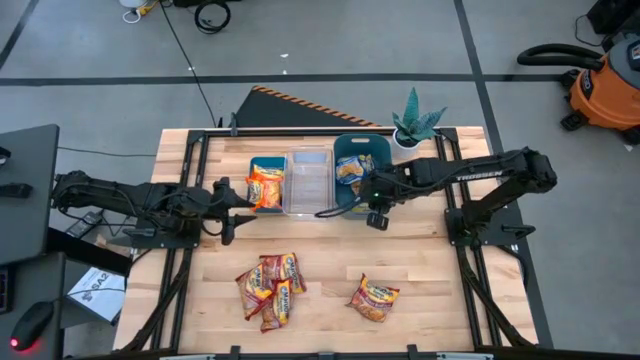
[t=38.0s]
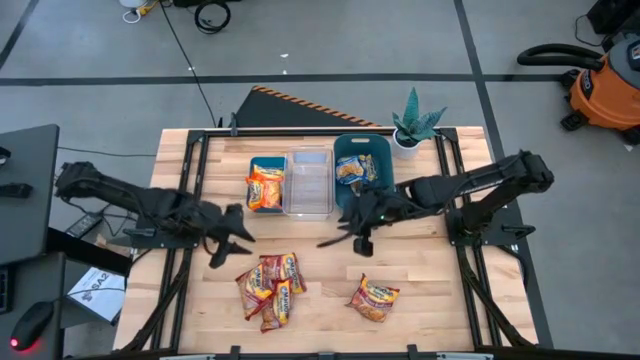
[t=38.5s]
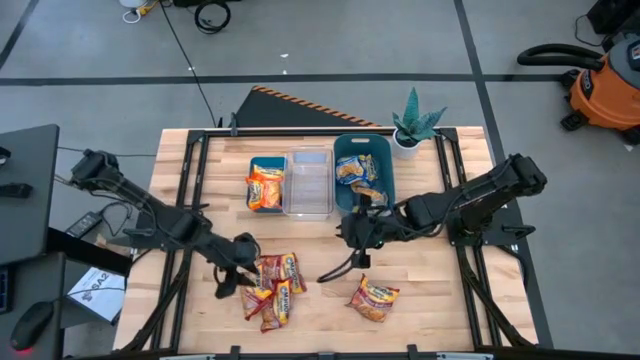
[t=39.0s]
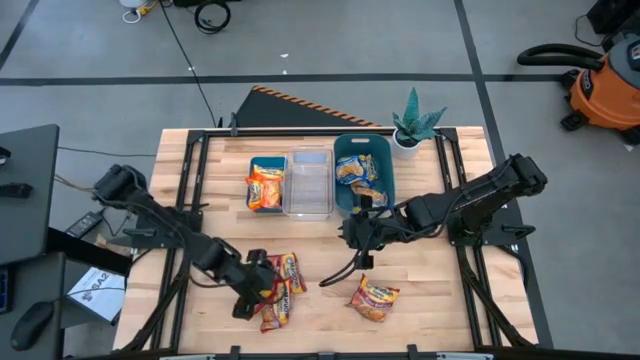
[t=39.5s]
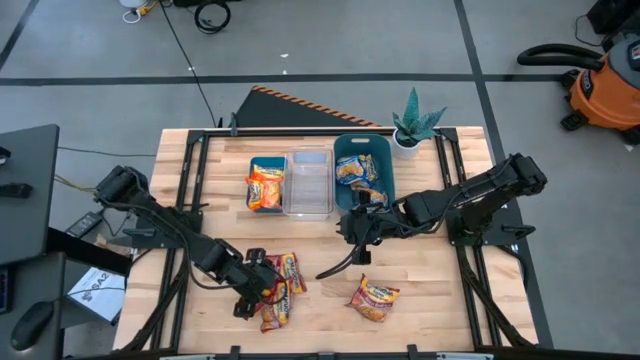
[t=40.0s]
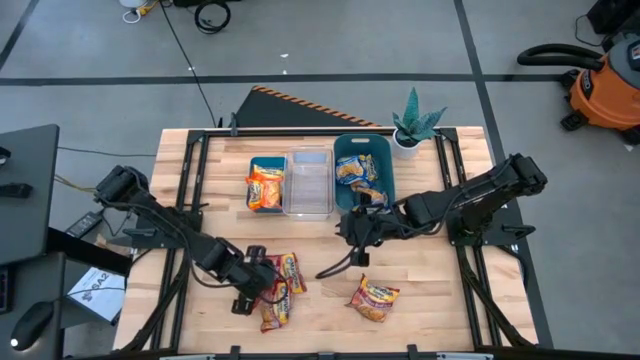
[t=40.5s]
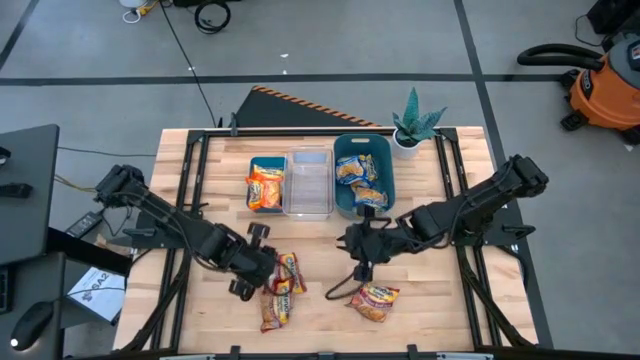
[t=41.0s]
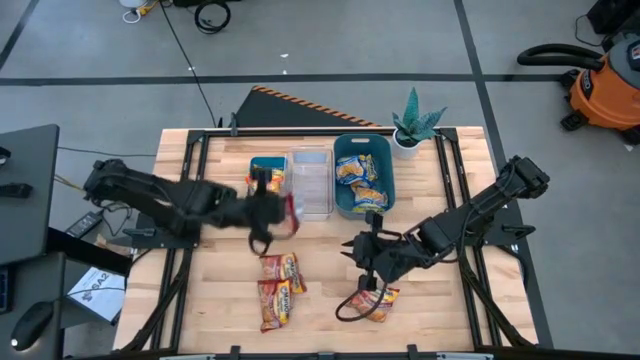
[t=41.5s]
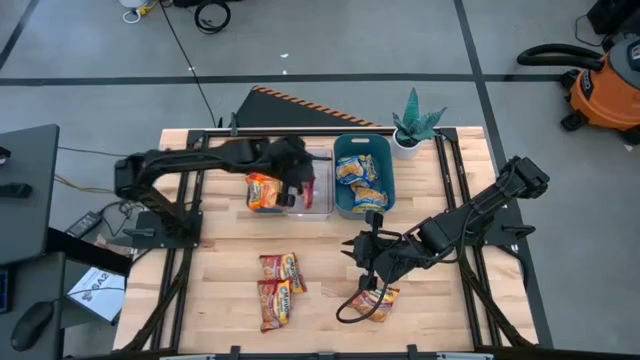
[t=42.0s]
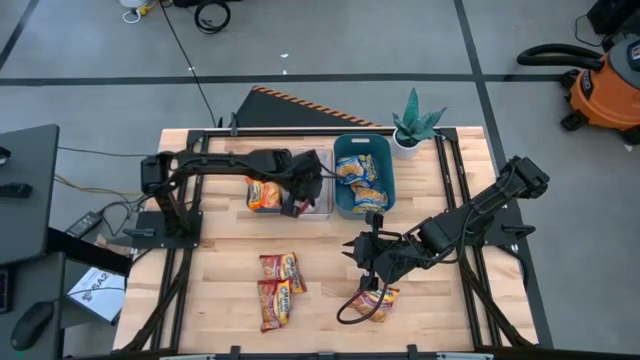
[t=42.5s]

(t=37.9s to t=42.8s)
Task: Sort Maruchan noodles
Put the red noodle pack into the transparent bin

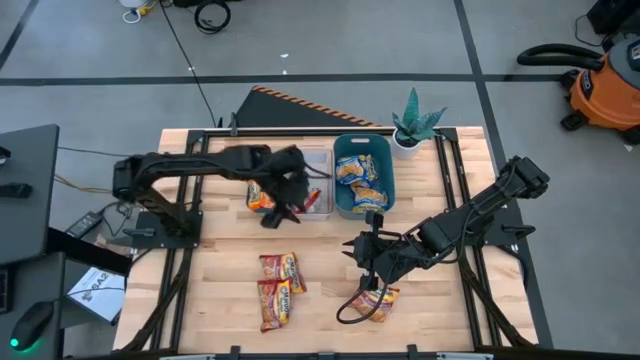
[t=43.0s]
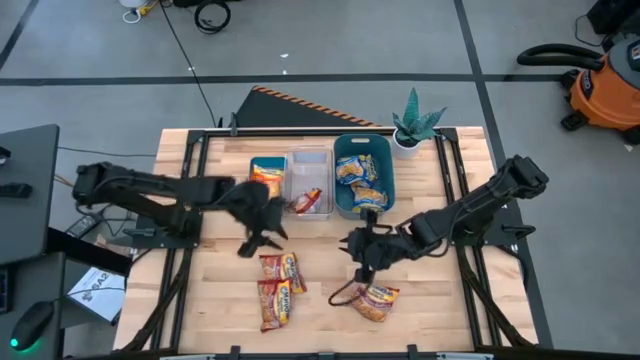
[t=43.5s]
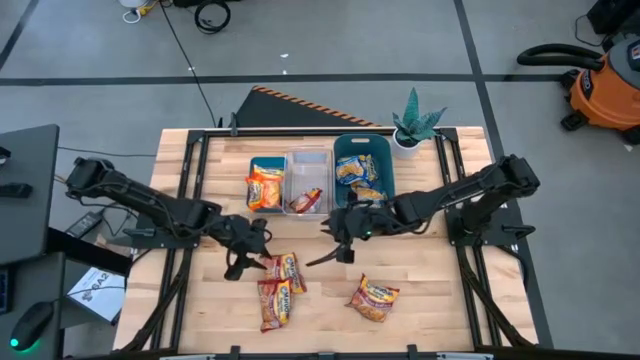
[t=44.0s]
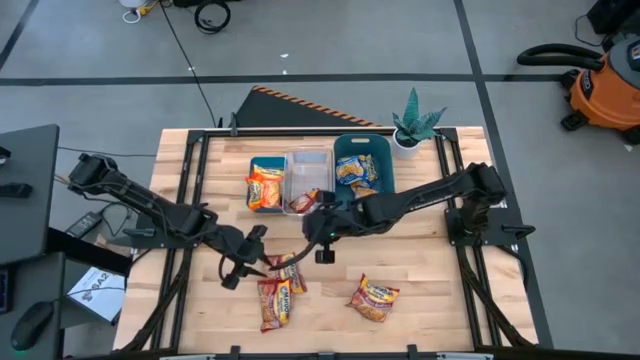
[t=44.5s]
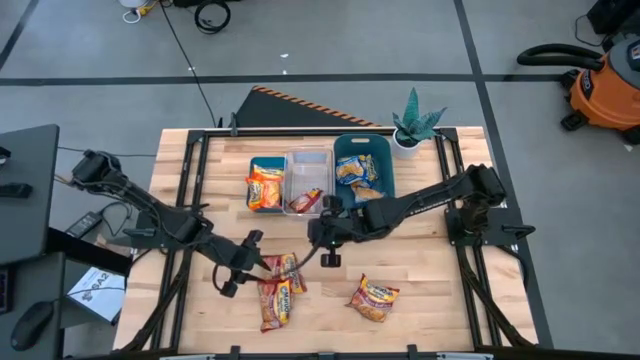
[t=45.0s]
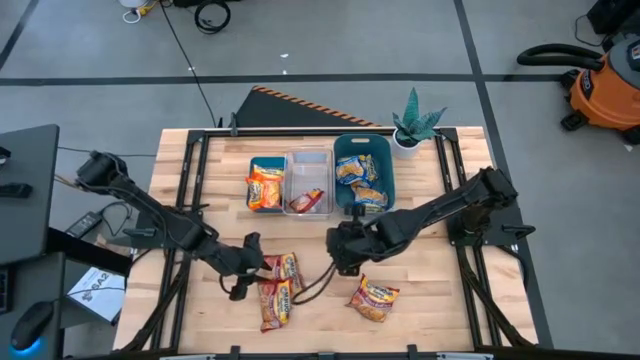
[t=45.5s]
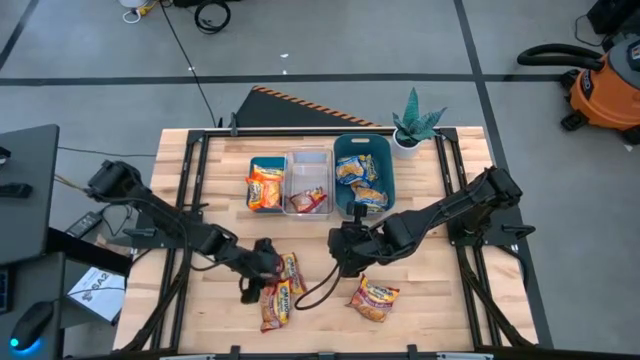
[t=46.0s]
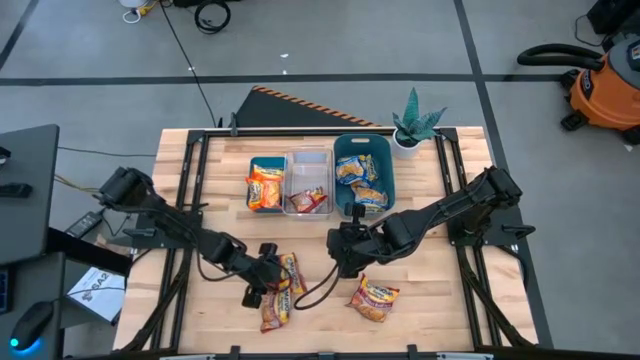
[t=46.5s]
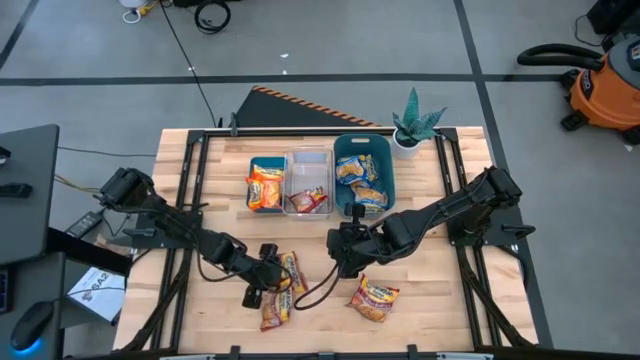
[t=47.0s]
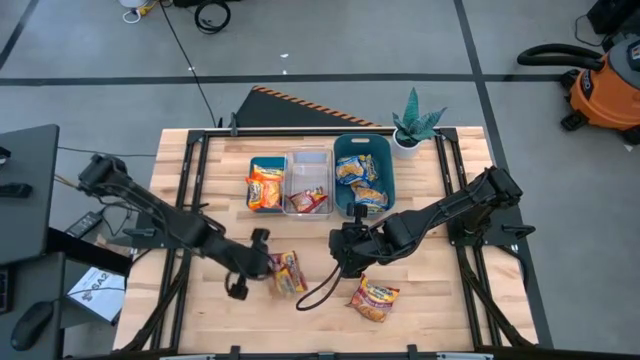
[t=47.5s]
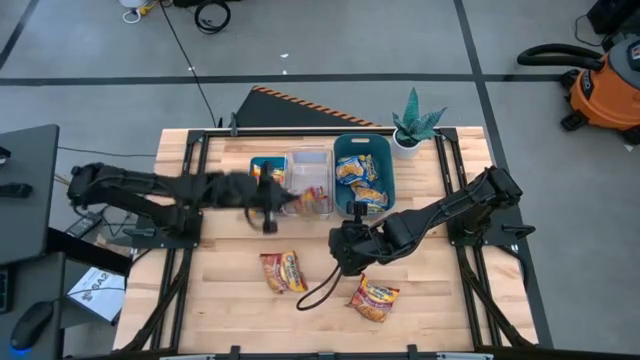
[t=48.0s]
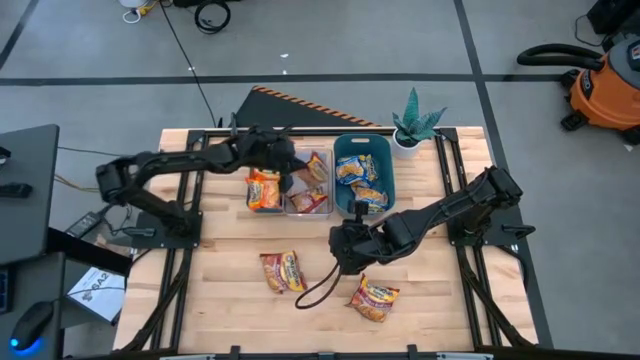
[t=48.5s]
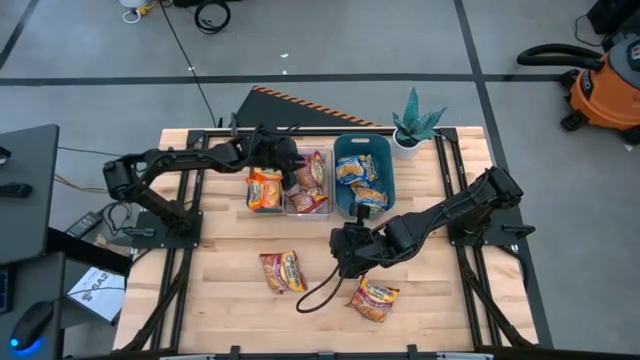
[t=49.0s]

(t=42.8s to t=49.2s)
Put the red noodle pack into the transparent bin

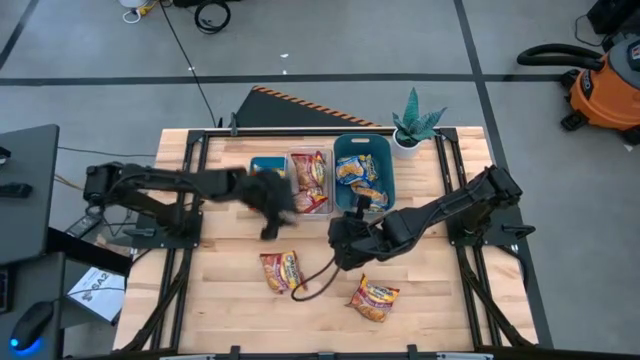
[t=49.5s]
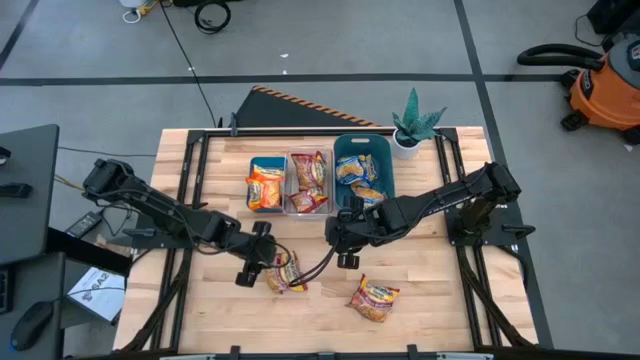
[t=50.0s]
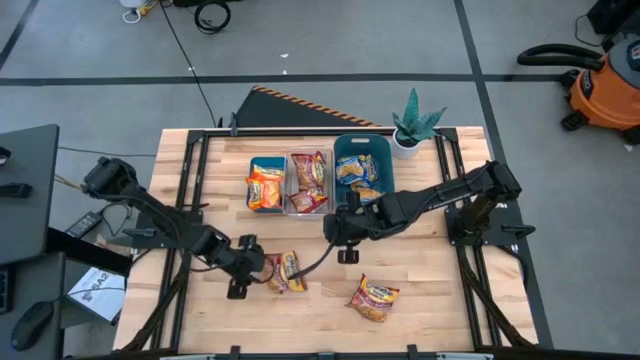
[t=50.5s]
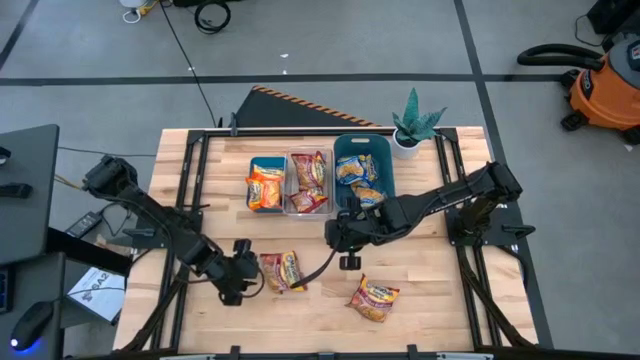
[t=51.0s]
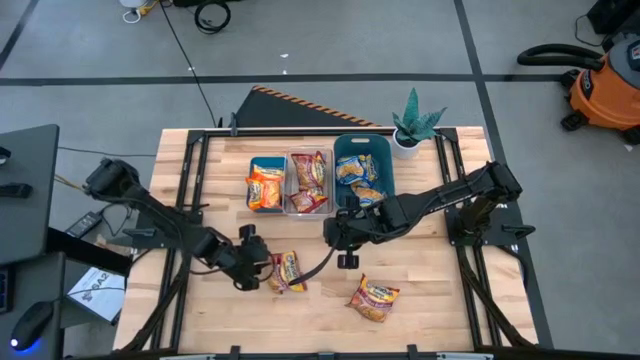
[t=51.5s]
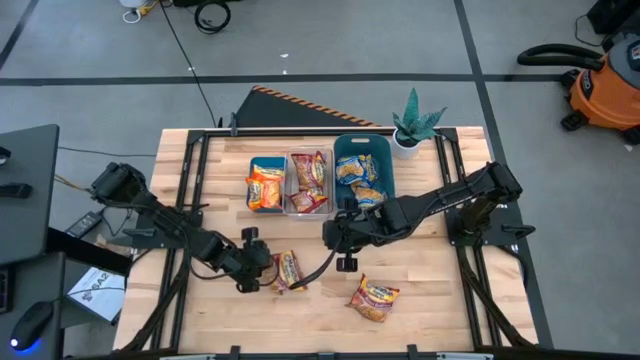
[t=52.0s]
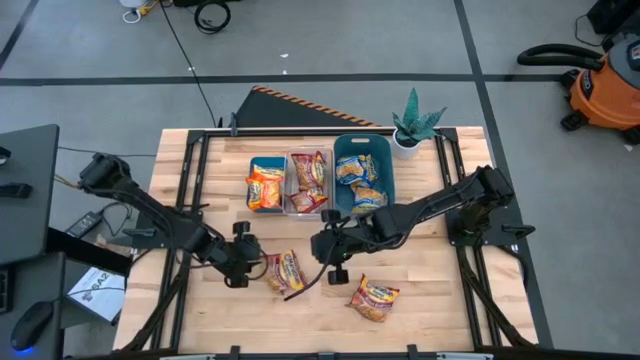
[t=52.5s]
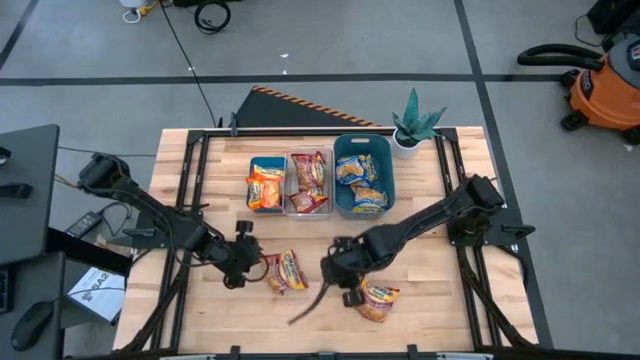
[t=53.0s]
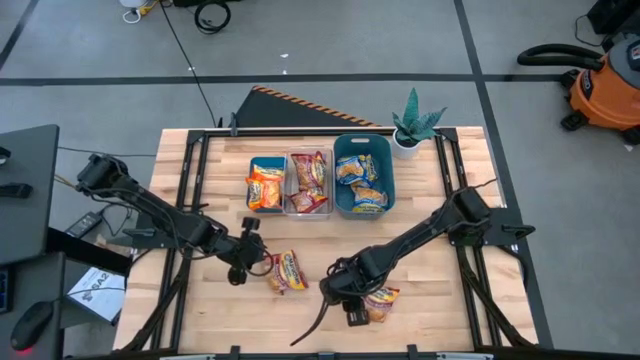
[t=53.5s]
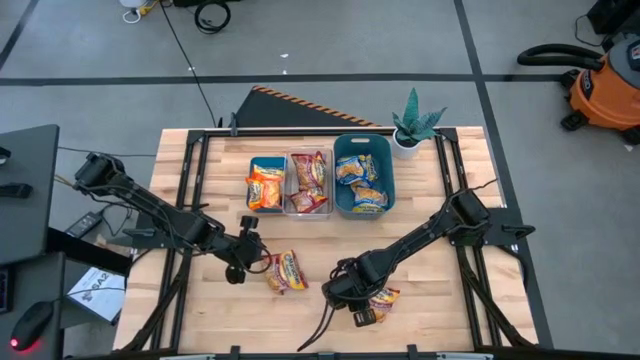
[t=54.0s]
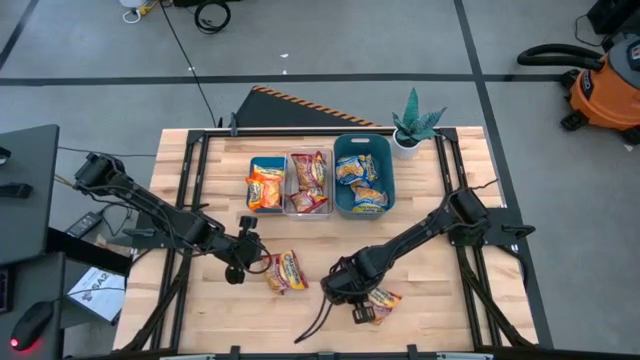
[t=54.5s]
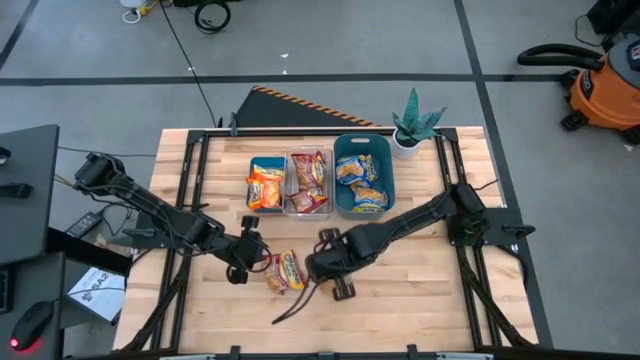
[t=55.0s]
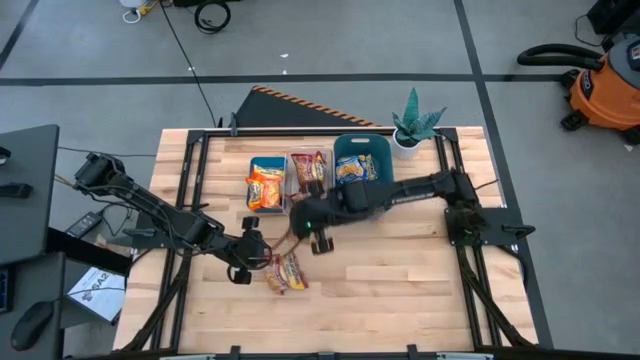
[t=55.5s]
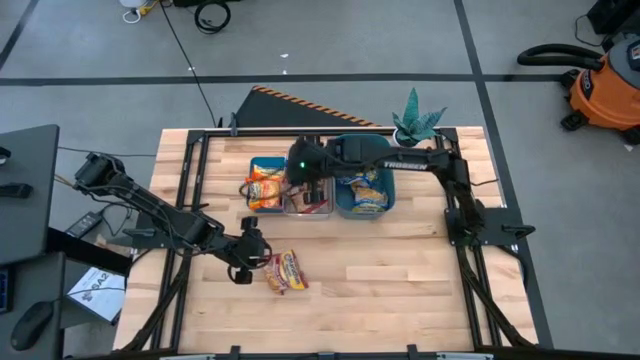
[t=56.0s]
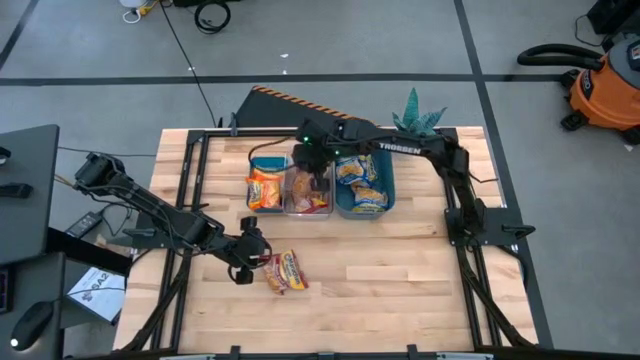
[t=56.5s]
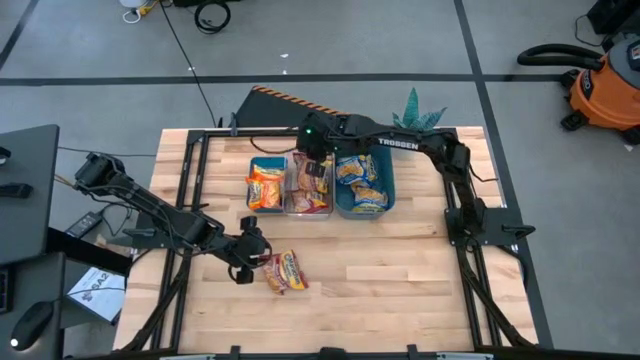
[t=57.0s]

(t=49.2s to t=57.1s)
Put the red noodle pack into the transparent bin

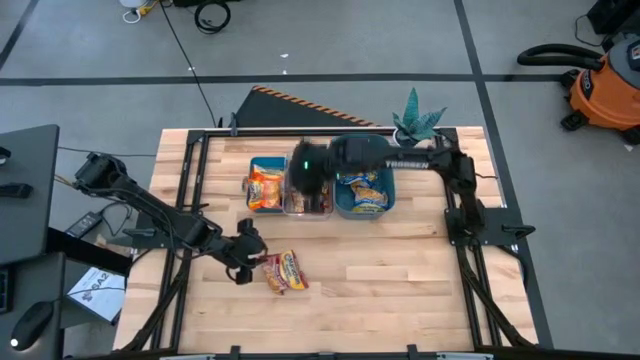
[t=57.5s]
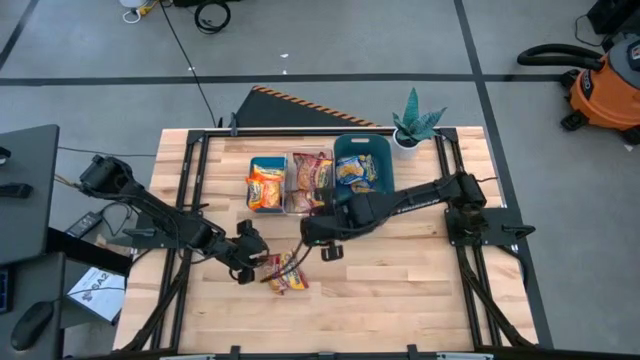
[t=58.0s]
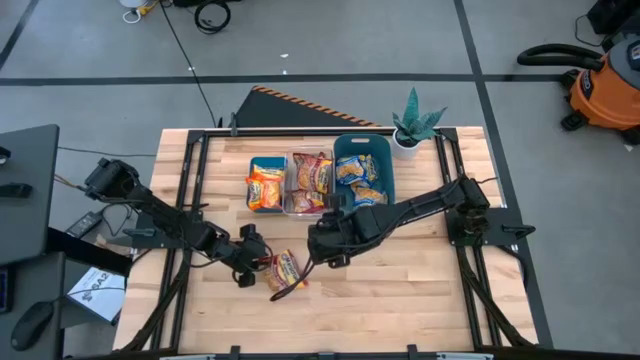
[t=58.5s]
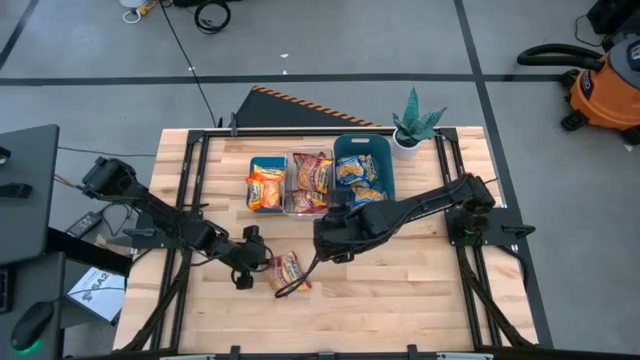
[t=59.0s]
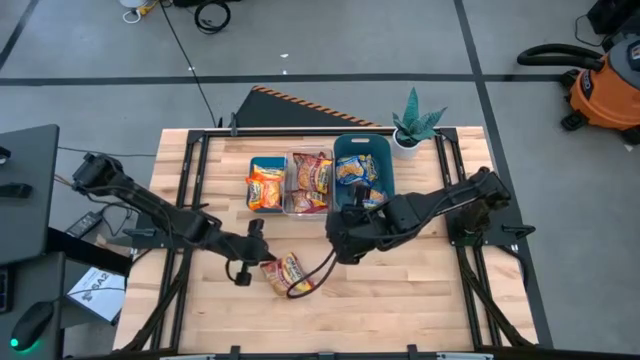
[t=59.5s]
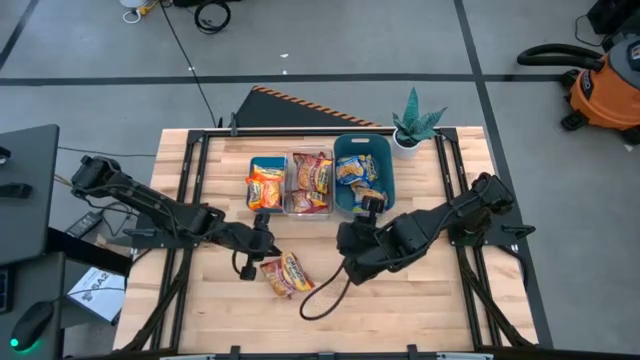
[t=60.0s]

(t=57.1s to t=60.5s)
Put the red noodle pack into the transparent bin
